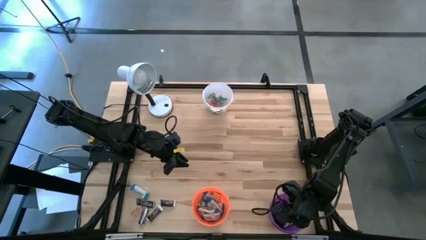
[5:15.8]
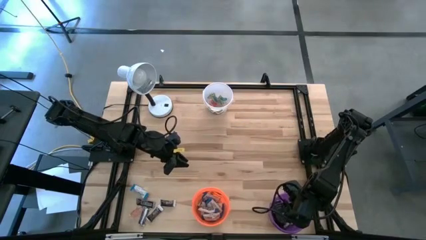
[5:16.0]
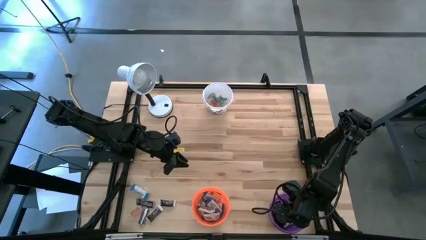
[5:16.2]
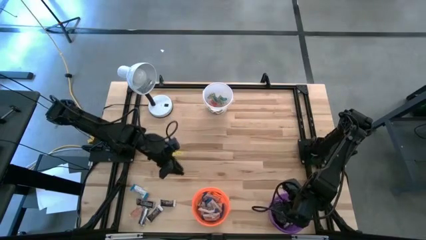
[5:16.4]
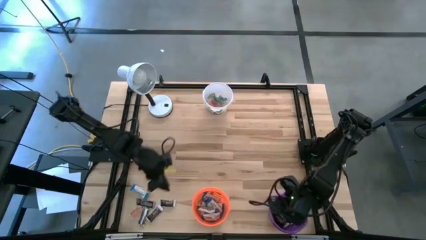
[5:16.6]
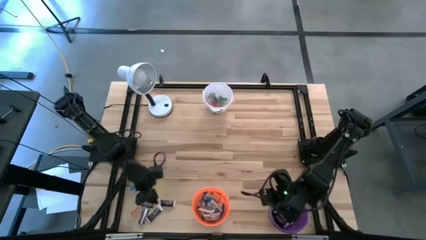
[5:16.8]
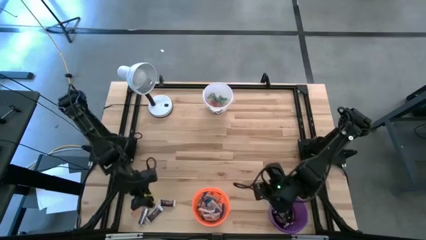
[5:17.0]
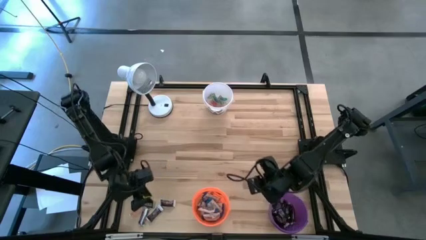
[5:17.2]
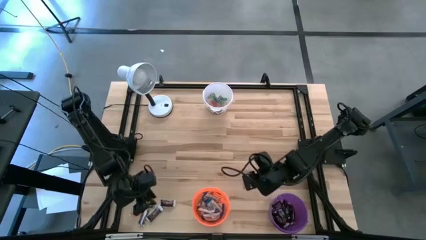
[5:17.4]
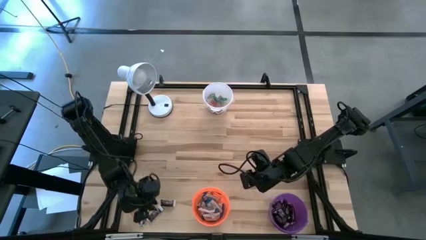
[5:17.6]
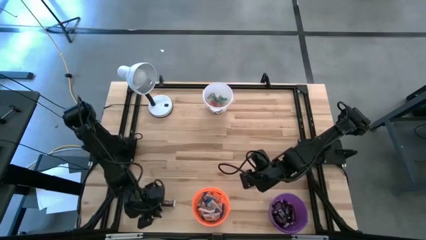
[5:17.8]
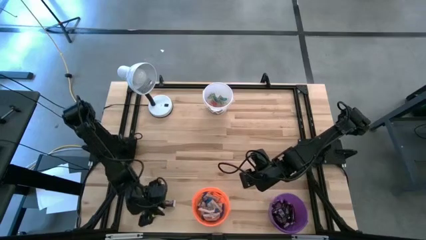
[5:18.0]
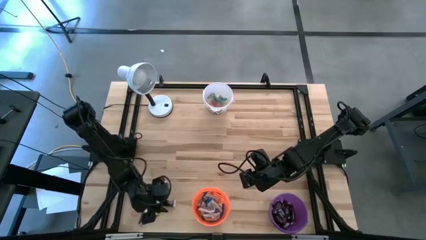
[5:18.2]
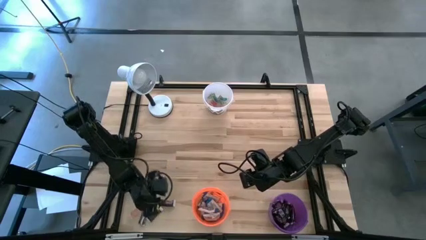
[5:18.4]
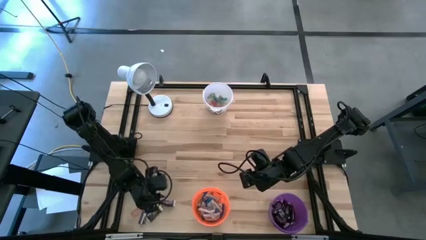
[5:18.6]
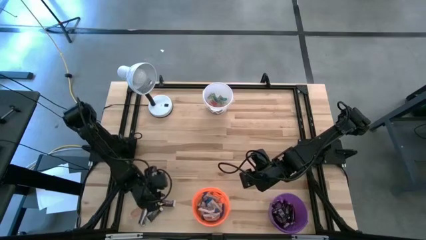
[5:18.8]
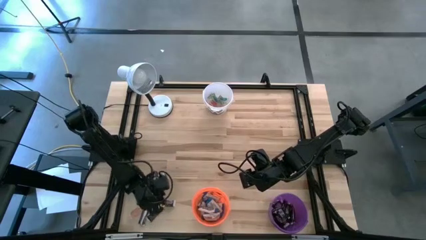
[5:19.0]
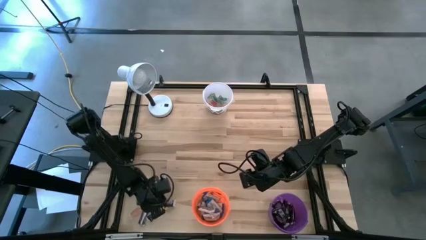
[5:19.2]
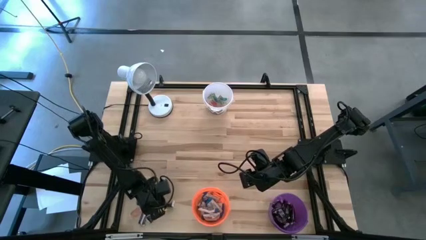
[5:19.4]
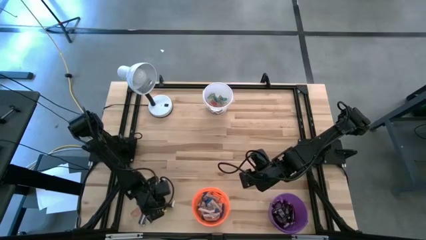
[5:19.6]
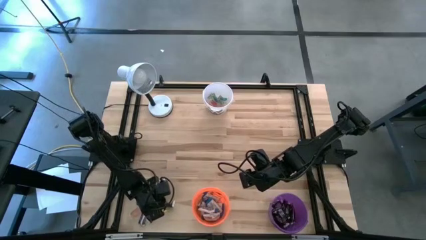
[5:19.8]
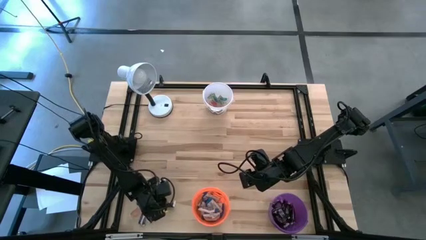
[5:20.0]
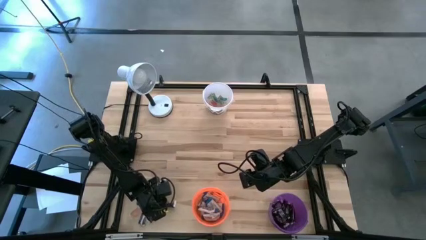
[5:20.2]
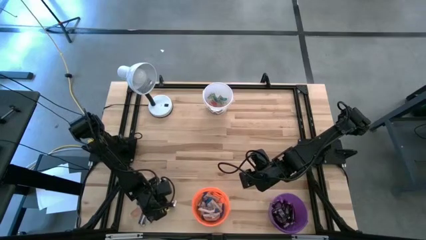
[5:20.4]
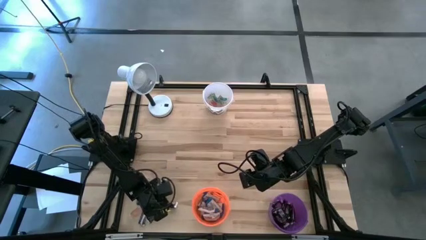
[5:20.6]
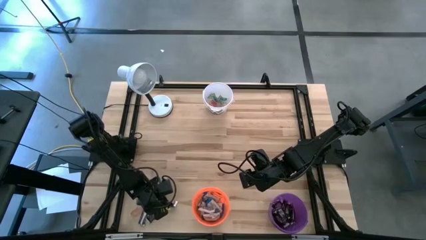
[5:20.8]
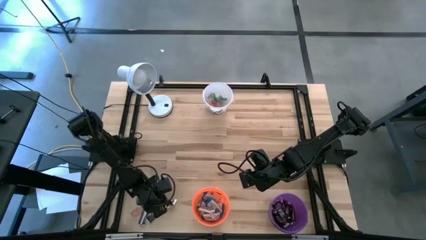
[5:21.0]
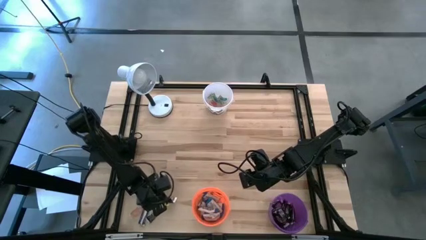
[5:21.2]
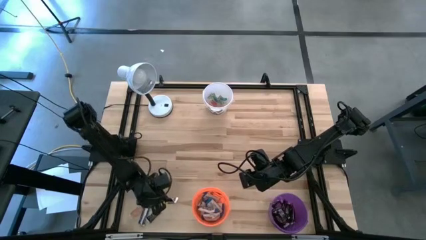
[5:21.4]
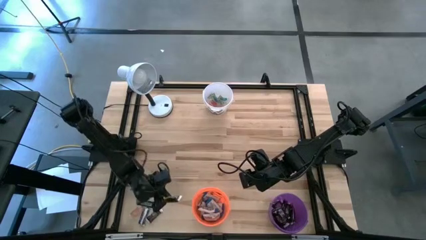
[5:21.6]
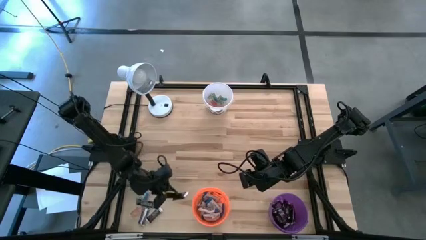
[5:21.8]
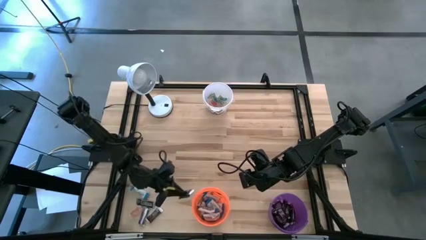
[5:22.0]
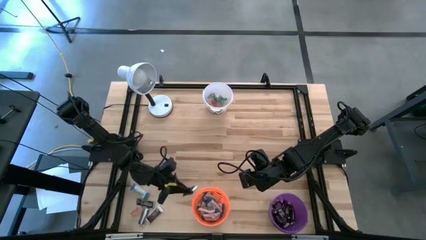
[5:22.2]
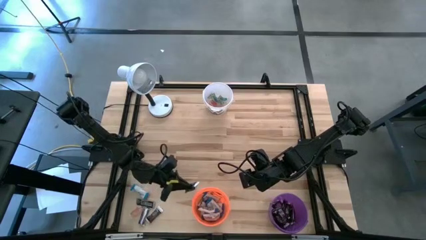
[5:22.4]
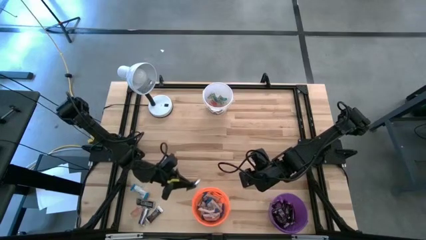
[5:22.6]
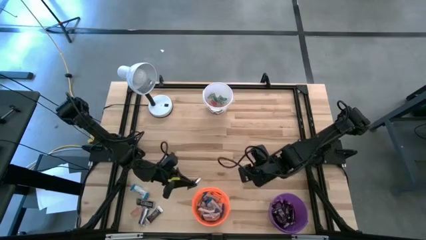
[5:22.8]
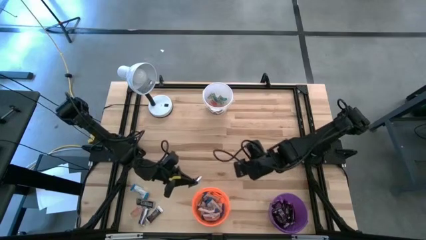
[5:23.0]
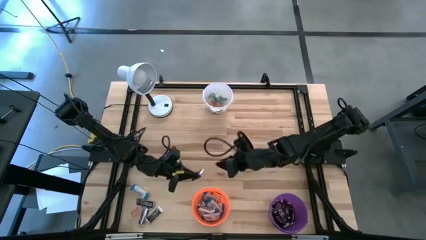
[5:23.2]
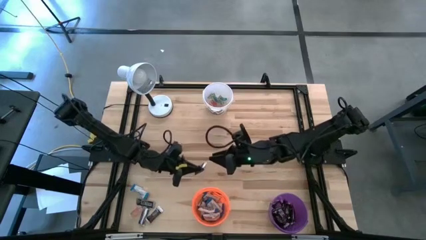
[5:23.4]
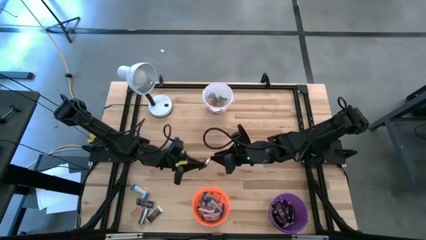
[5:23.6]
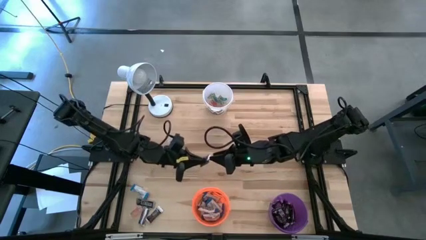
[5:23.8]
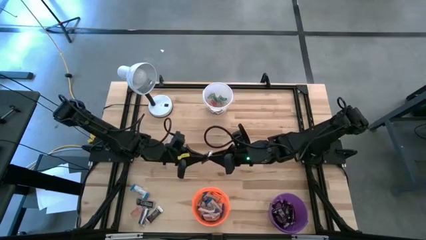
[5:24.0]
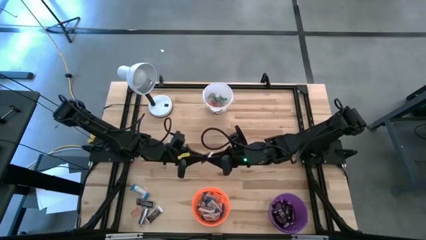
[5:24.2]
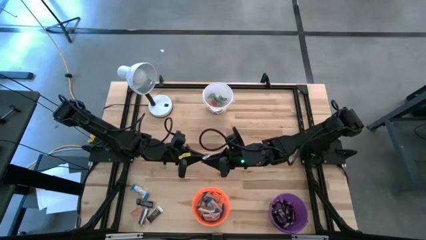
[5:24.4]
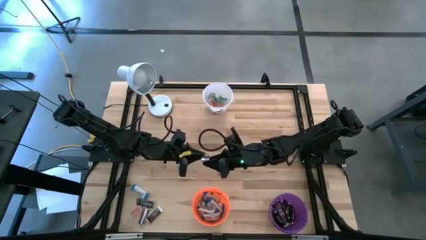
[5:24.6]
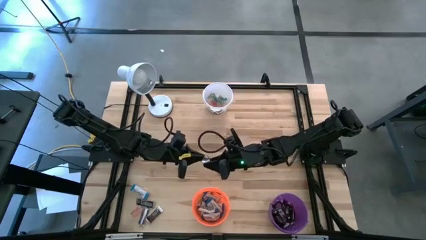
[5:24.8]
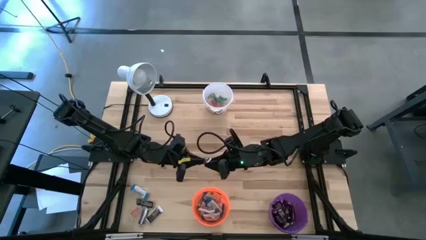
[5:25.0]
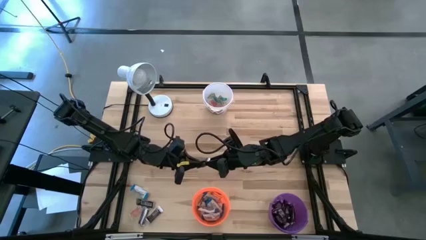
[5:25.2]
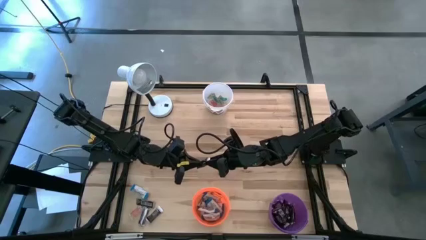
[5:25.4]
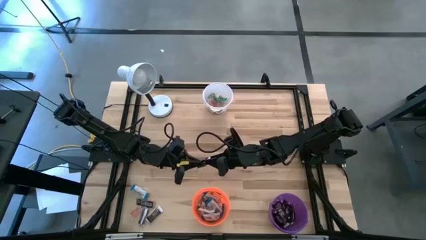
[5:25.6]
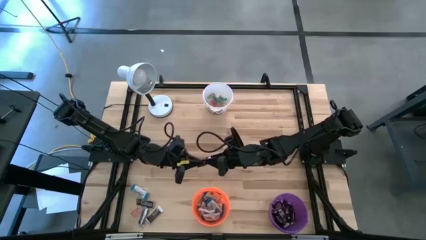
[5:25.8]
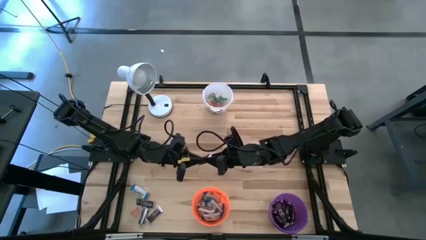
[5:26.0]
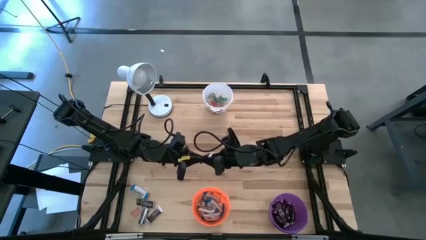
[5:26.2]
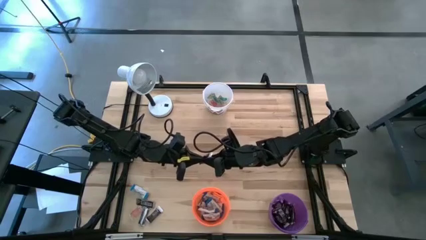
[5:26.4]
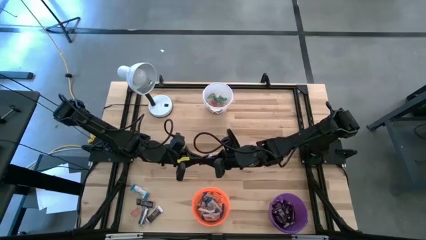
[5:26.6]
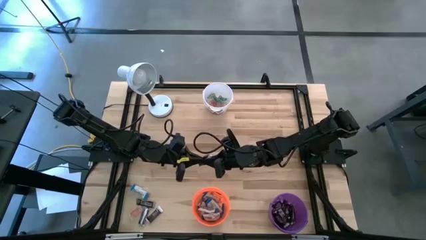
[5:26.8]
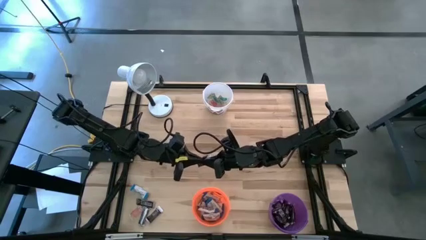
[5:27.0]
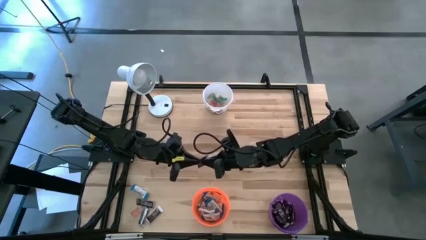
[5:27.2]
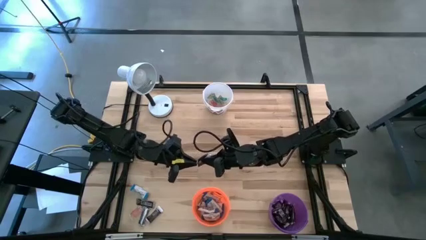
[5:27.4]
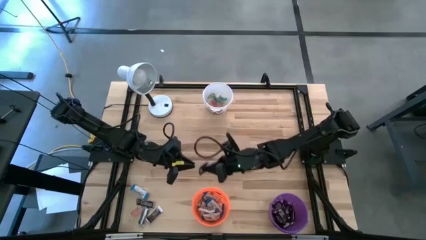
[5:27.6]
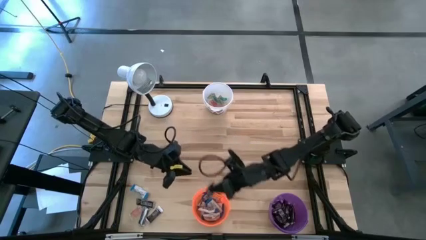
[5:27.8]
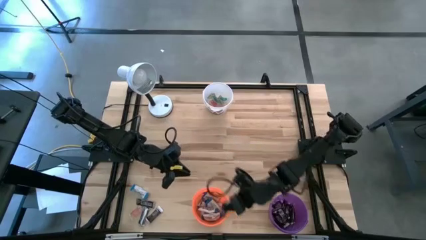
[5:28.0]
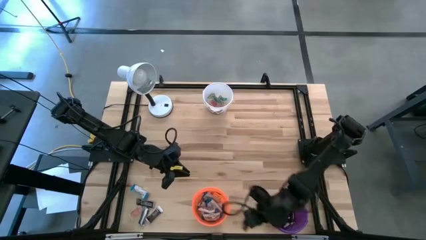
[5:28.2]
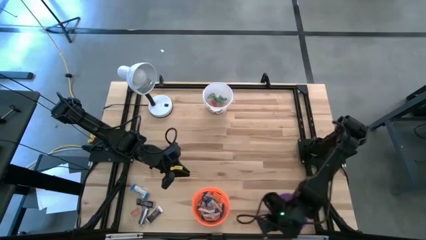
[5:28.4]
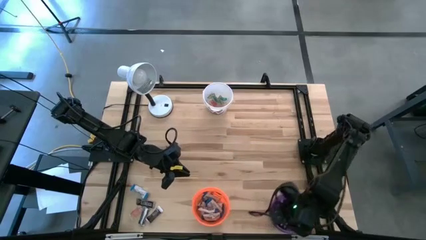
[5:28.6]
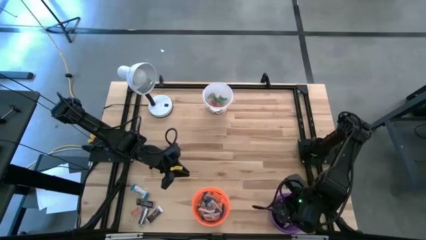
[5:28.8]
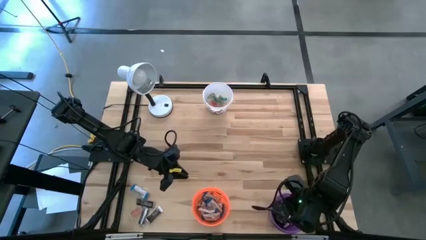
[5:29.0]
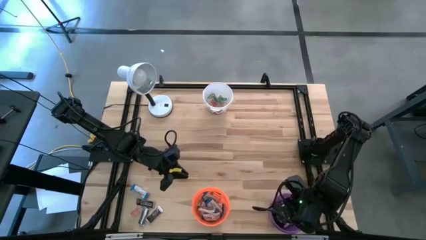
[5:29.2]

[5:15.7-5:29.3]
Task: Organize candy in baskets
Put the dark brown chocolate bar into the dark purple bucket
